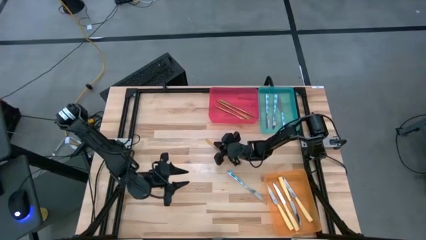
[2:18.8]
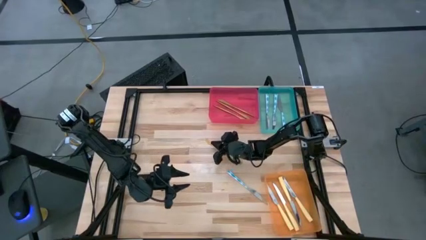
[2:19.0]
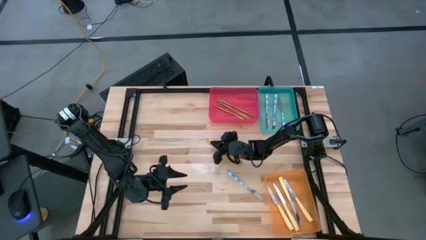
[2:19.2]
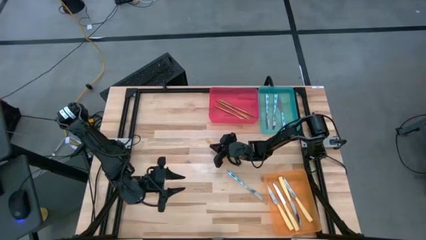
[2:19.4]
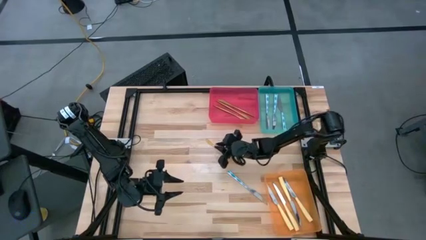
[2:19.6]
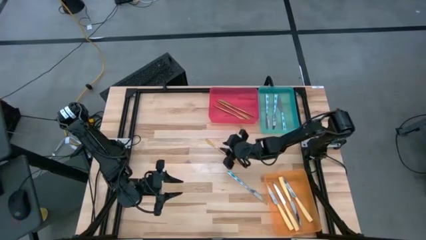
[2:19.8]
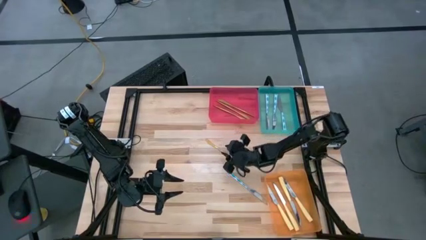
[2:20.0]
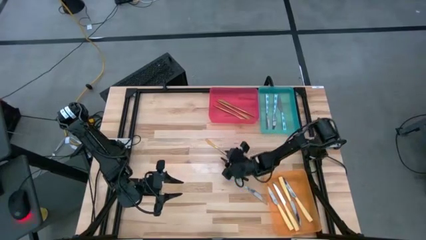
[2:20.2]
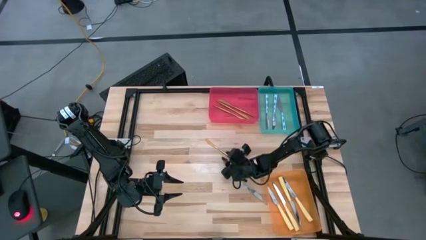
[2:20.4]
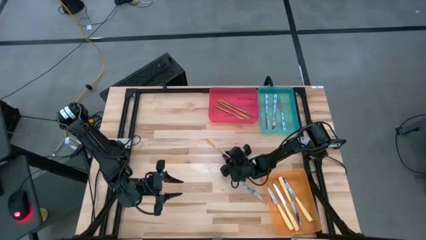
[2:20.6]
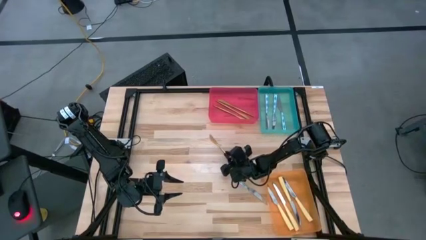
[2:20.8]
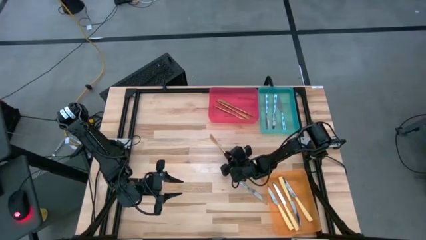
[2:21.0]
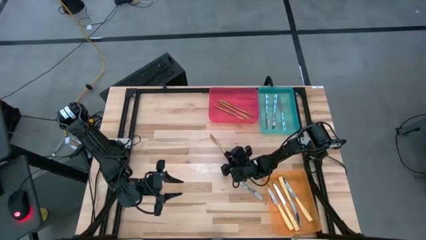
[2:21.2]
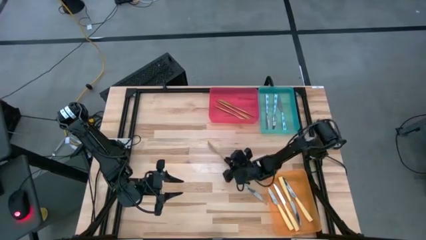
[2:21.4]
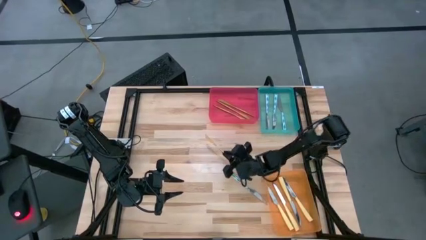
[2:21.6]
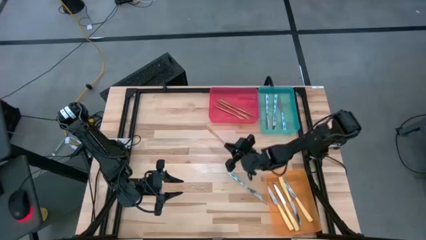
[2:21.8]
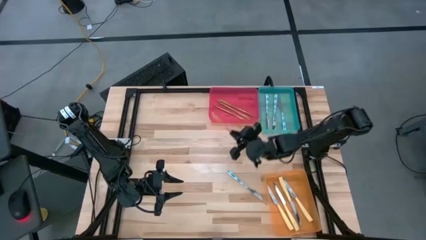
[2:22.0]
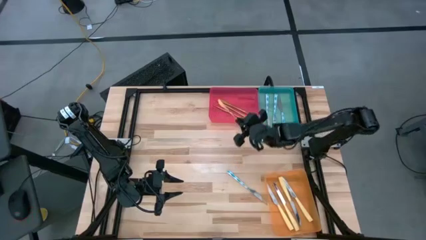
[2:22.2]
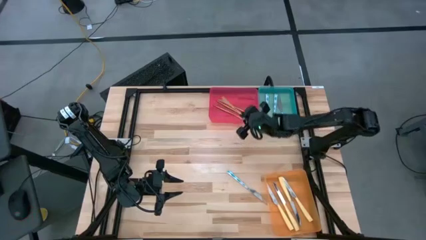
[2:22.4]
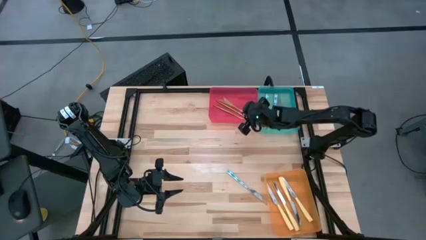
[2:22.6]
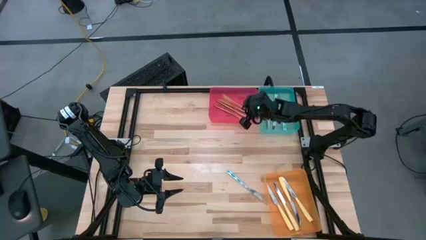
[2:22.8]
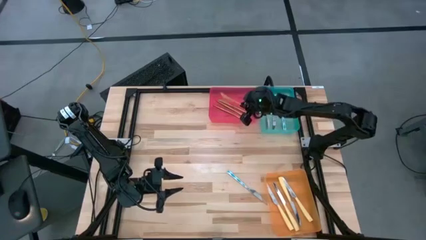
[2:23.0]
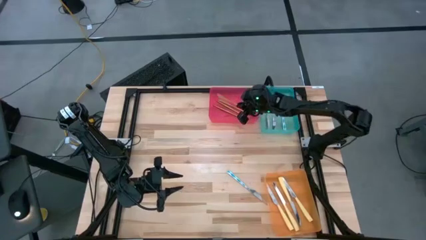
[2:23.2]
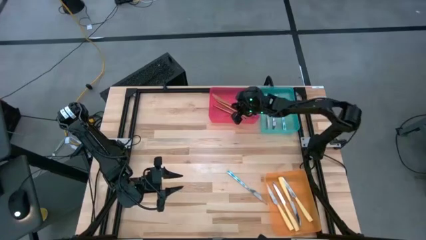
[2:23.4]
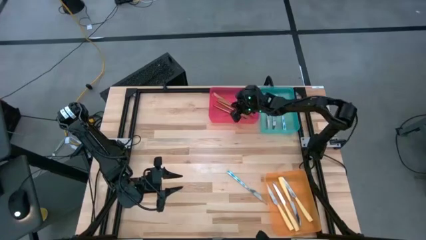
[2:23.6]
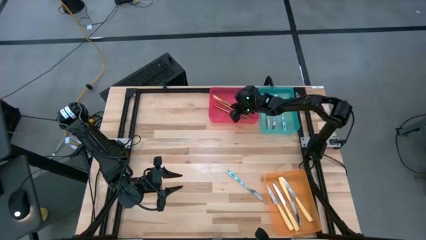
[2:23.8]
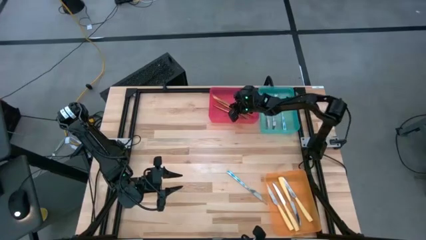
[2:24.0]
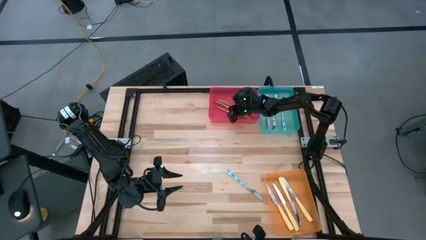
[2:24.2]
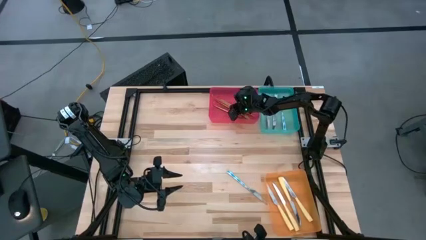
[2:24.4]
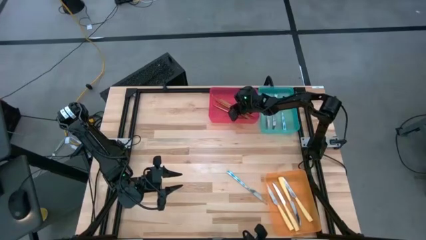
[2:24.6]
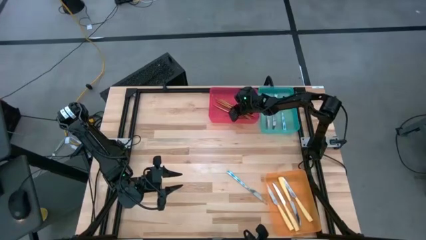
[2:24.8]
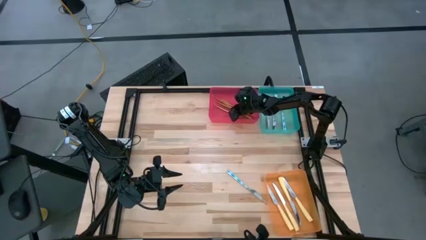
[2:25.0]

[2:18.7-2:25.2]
Task: Sort silverware by color (type)
Put the golden knife into the red bin

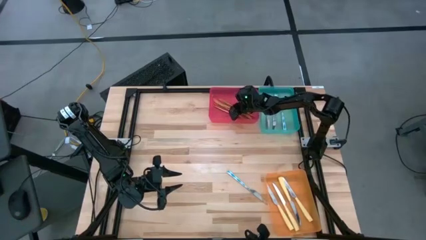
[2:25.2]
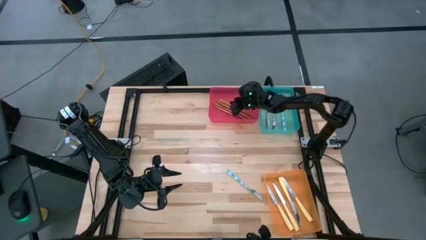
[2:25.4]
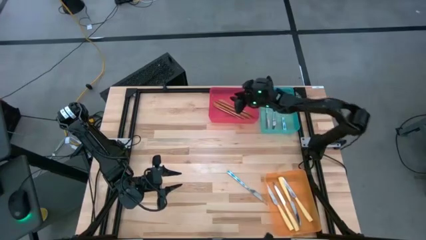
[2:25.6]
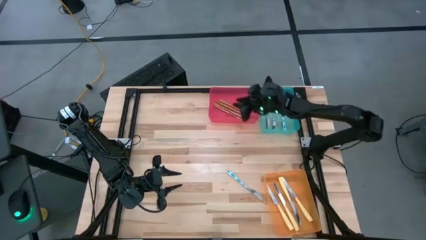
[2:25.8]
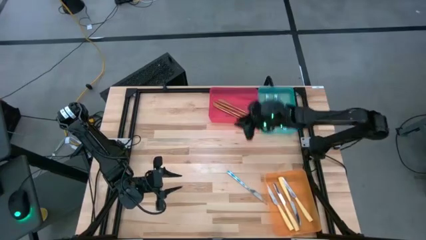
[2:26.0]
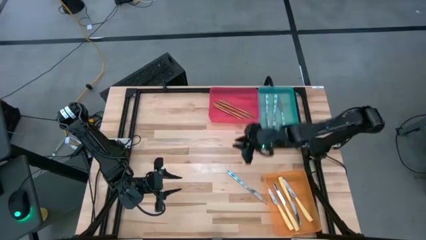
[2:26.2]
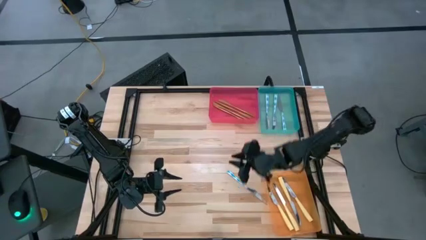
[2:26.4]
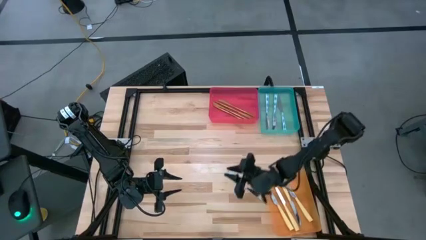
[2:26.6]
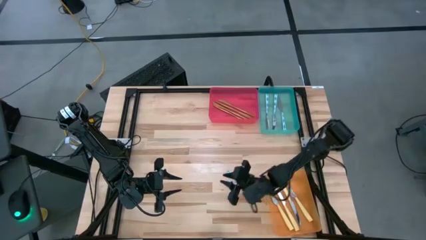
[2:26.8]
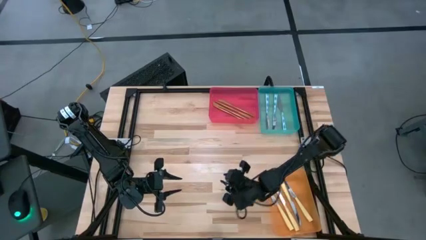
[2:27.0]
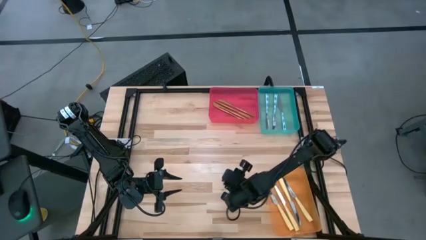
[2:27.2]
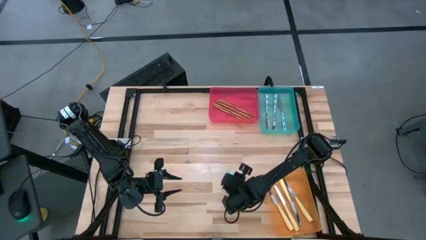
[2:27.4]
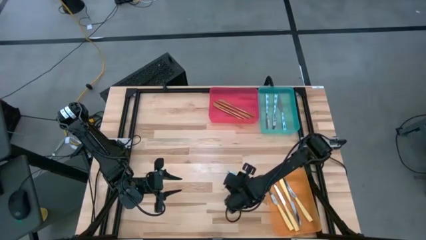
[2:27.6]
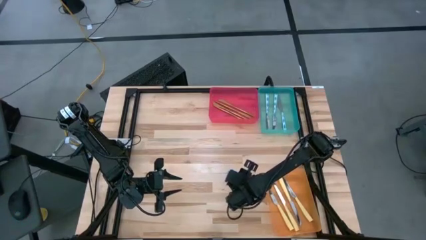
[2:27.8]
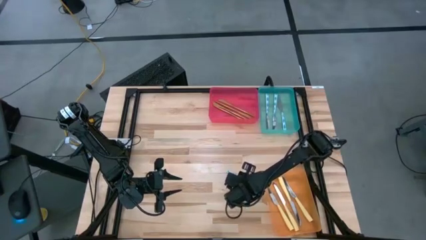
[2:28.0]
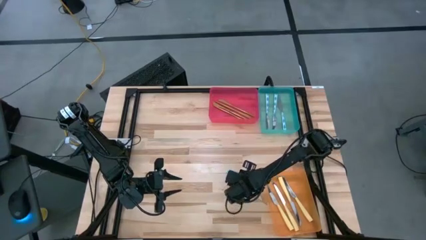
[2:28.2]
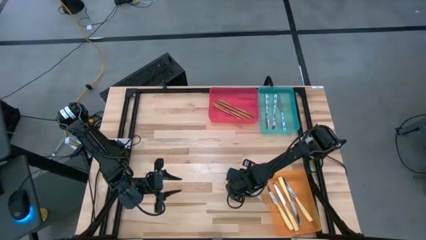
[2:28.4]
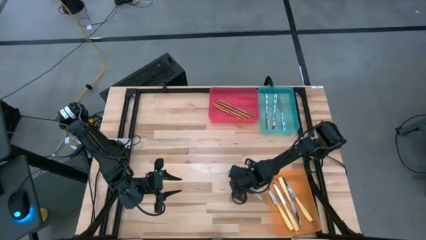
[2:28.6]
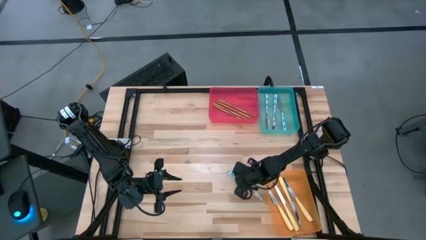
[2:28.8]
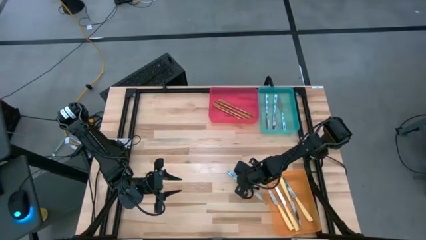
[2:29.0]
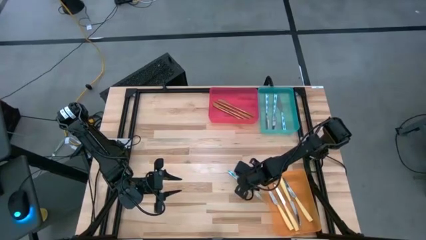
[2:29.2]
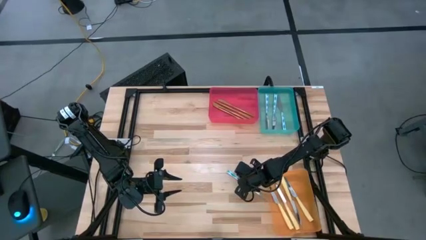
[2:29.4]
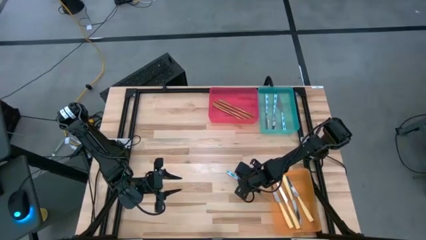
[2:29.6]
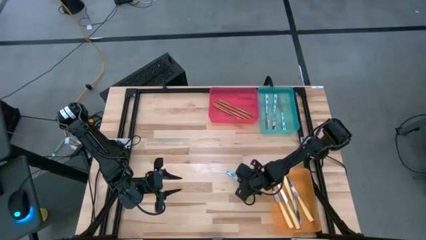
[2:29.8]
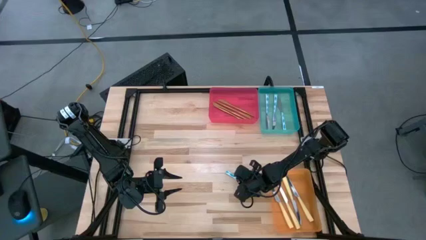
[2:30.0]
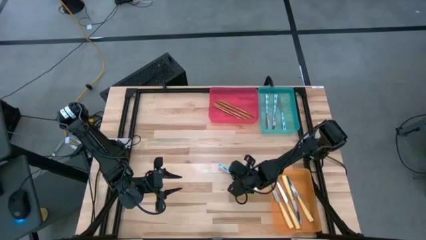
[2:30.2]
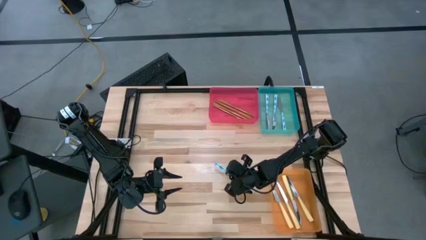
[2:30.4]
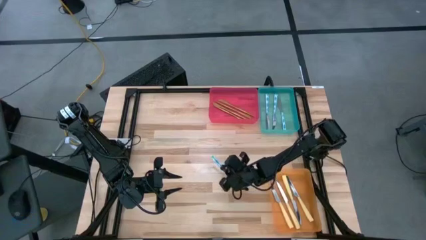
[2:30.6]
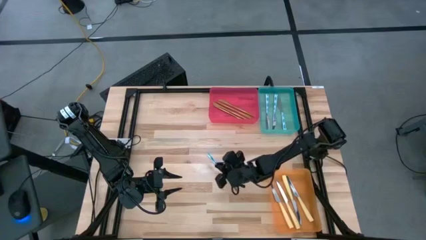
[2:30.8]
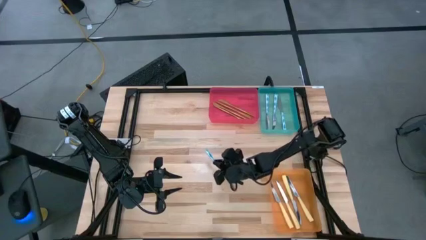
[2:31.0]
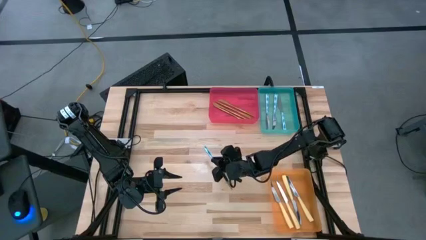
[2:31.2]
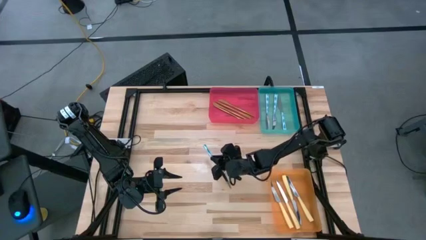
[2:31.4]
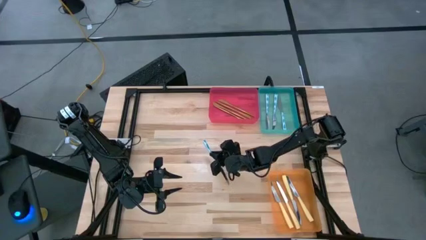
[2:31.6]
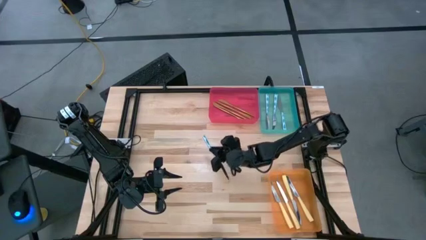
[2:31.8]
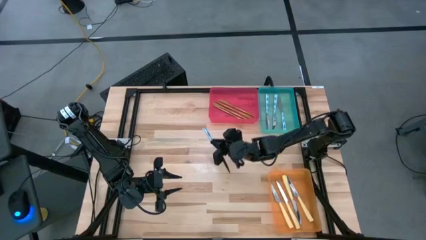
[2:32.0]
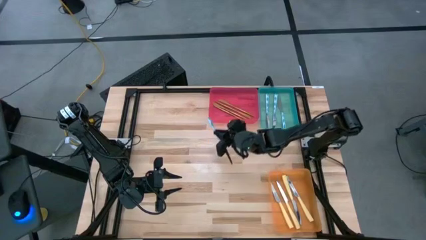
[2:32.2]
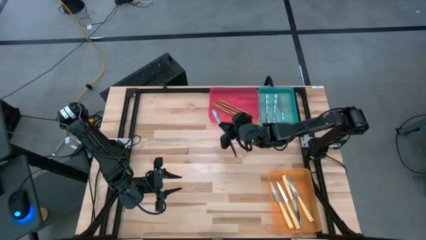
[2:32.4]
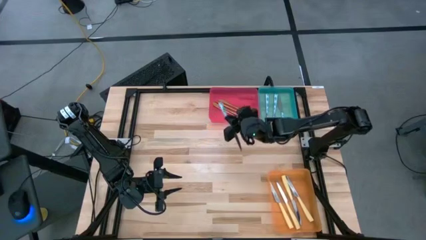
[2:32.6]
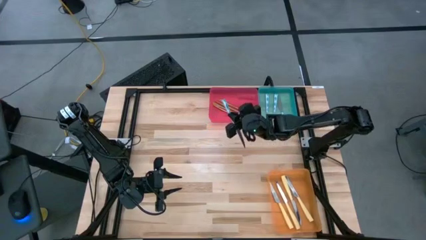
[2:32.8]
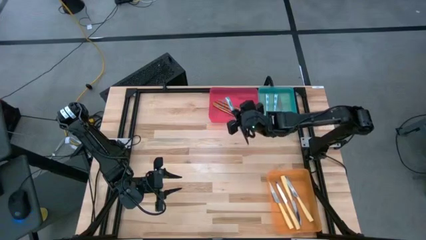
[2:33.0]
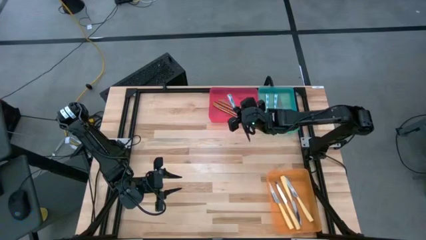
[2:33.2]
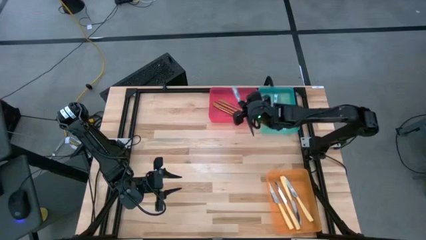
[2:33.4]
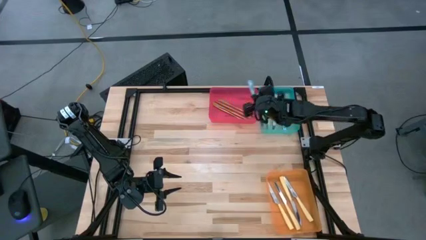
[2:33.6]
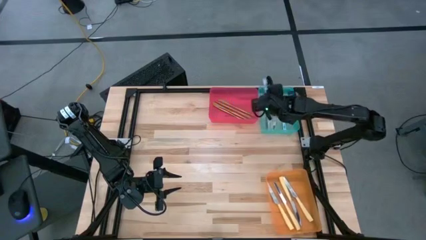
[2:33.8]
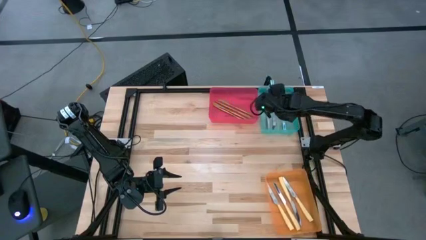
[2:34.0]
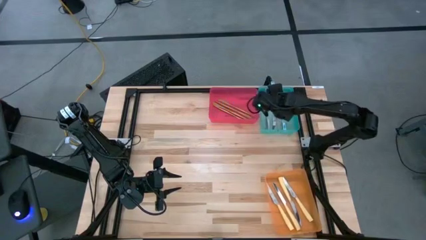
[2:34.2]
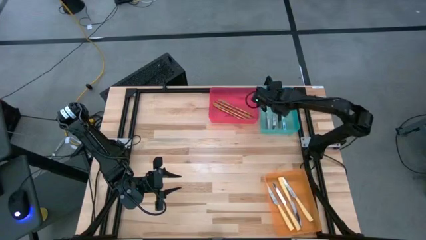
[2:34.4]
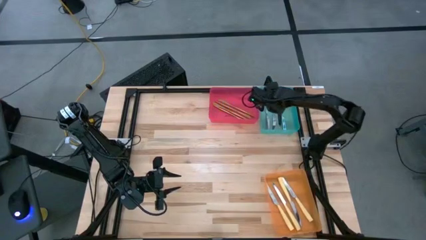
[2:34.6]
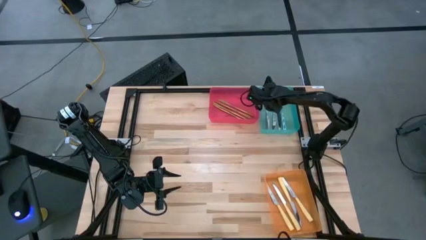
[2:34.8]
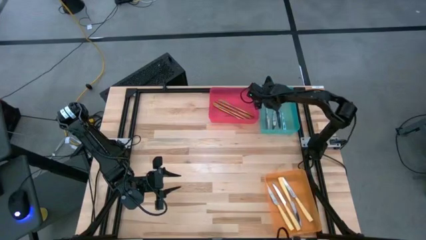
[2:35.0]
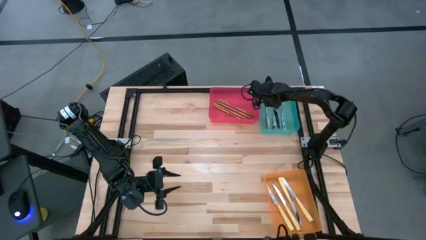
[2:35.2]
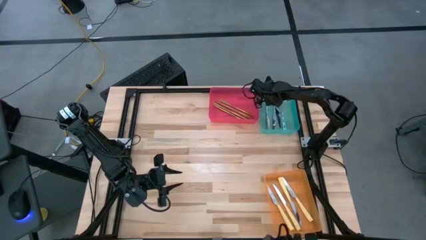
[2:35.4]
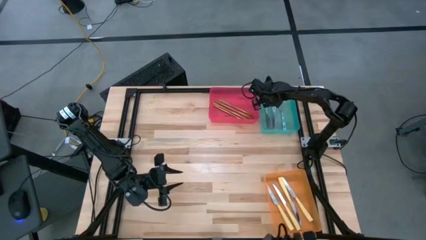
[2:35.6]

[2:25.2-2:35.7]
Put the blue knife into the blue bin
